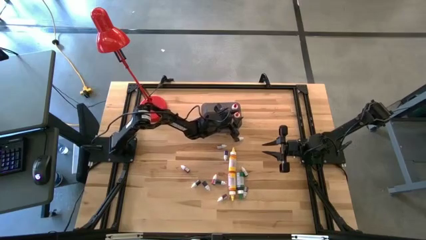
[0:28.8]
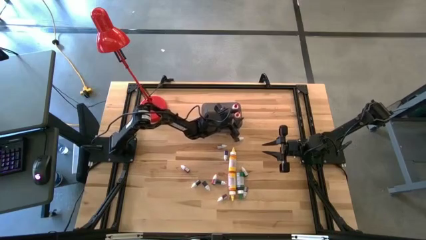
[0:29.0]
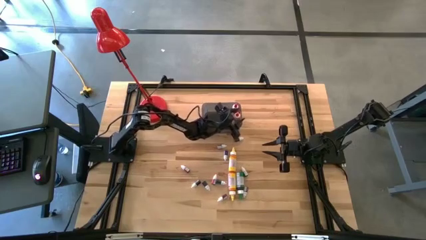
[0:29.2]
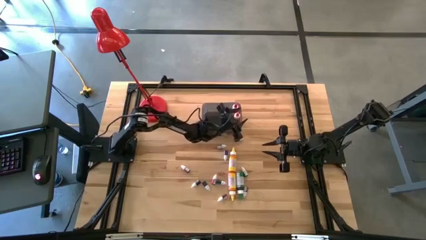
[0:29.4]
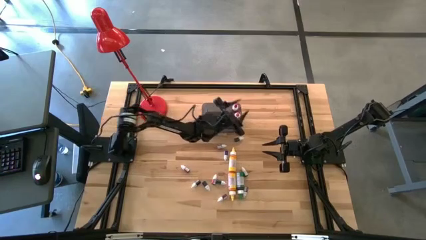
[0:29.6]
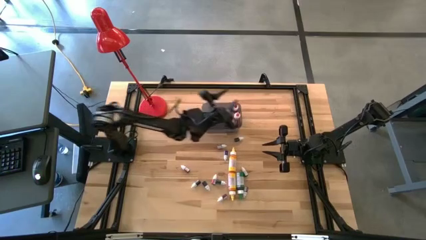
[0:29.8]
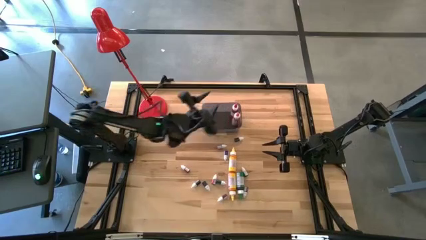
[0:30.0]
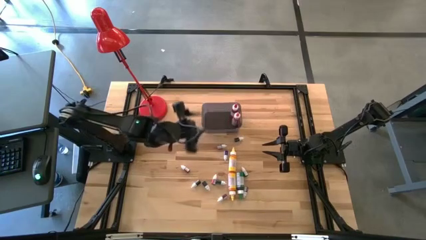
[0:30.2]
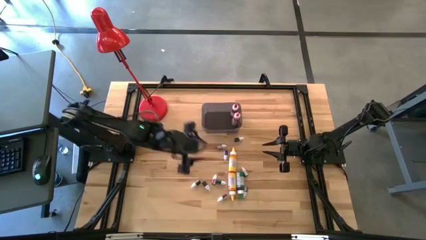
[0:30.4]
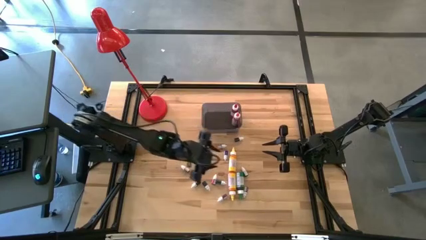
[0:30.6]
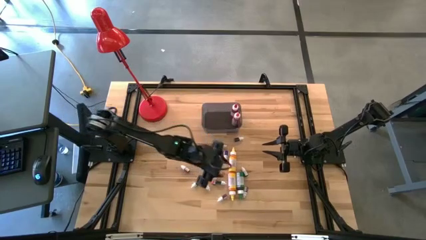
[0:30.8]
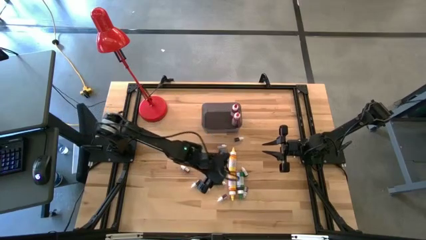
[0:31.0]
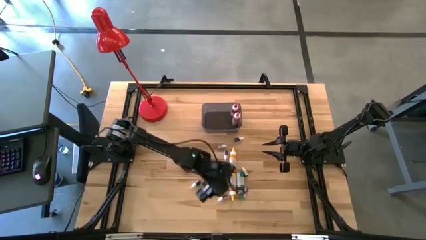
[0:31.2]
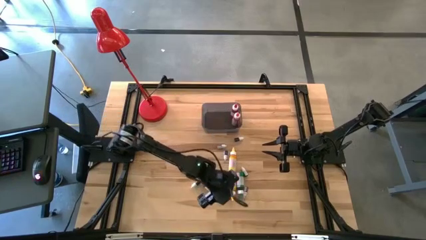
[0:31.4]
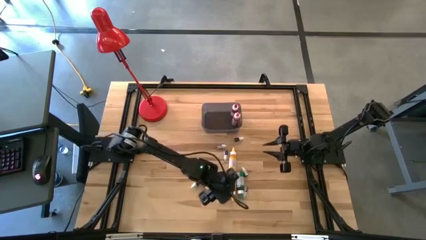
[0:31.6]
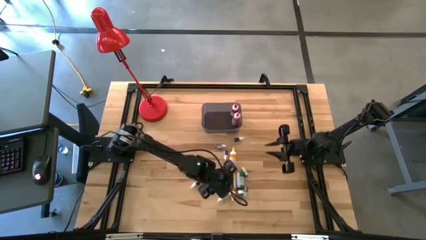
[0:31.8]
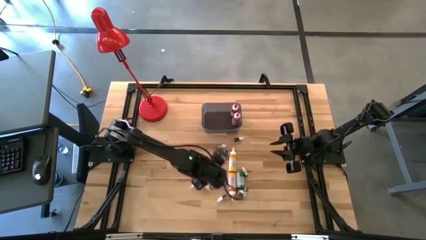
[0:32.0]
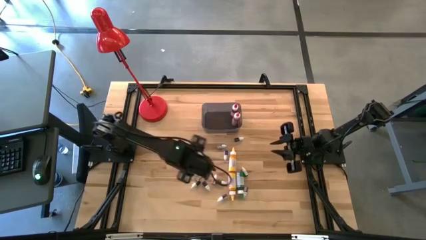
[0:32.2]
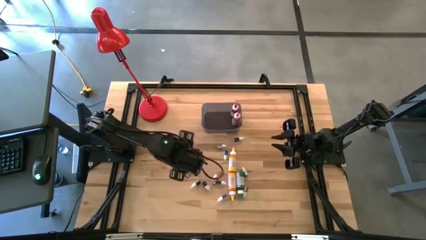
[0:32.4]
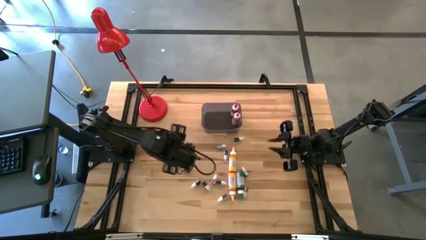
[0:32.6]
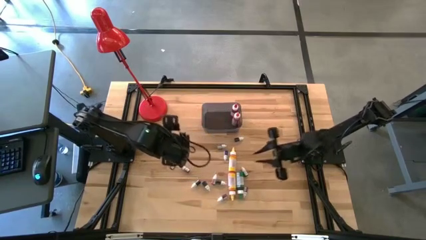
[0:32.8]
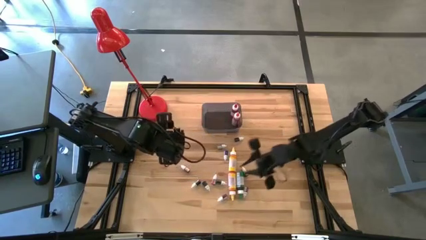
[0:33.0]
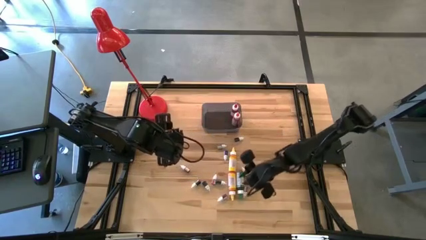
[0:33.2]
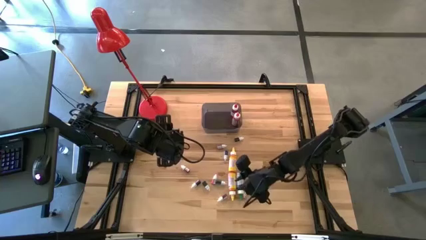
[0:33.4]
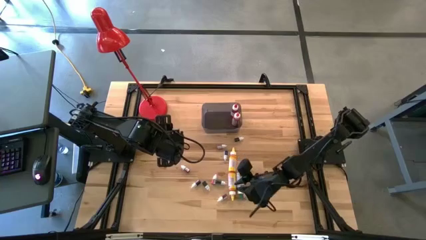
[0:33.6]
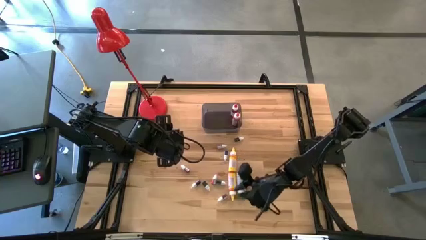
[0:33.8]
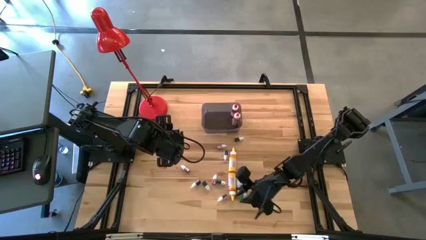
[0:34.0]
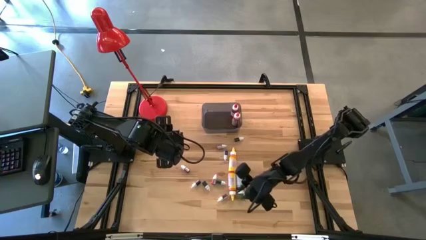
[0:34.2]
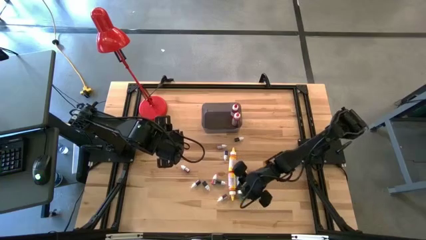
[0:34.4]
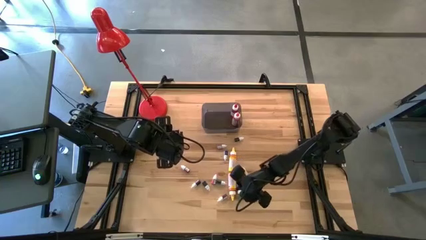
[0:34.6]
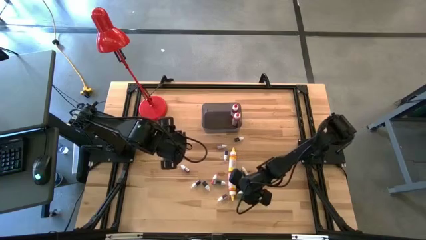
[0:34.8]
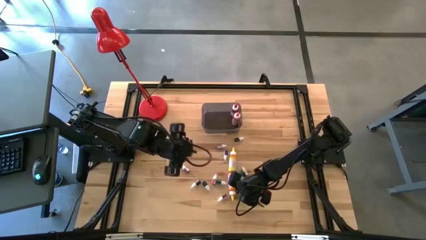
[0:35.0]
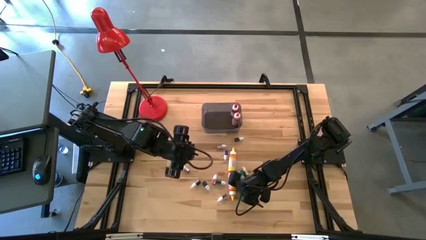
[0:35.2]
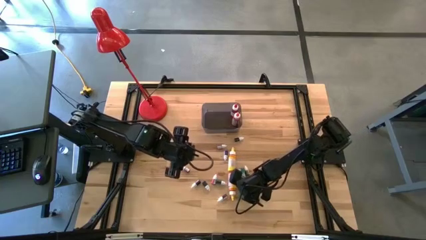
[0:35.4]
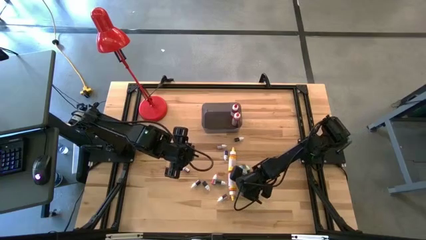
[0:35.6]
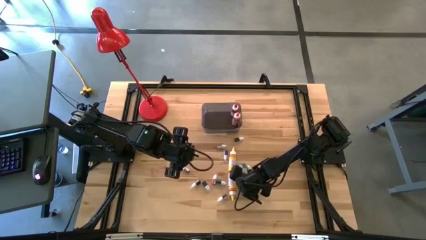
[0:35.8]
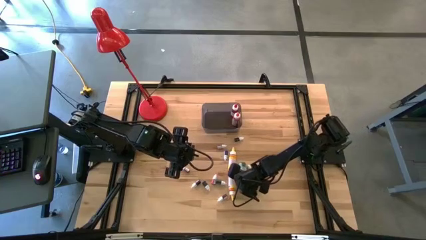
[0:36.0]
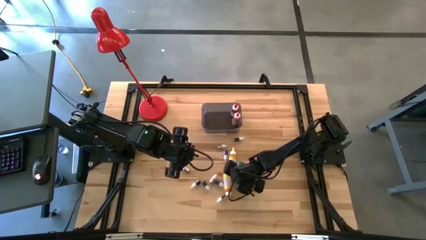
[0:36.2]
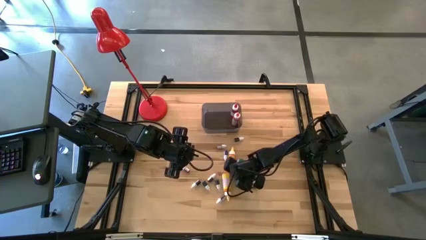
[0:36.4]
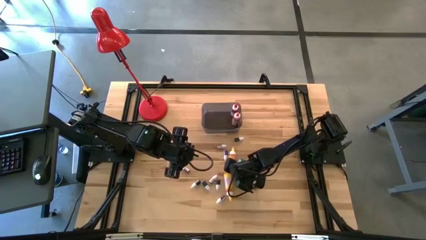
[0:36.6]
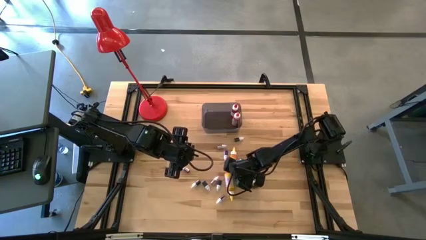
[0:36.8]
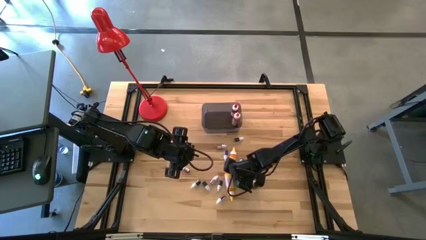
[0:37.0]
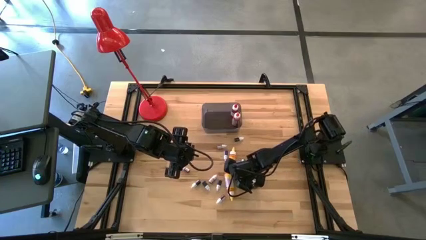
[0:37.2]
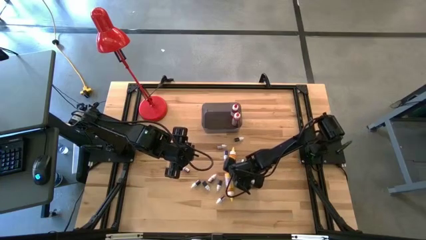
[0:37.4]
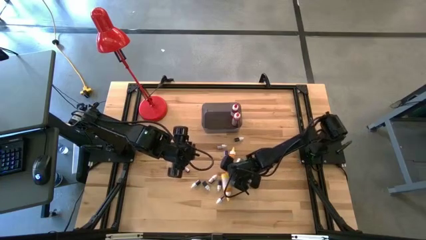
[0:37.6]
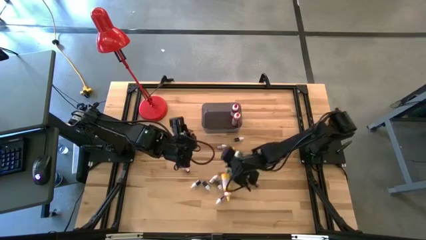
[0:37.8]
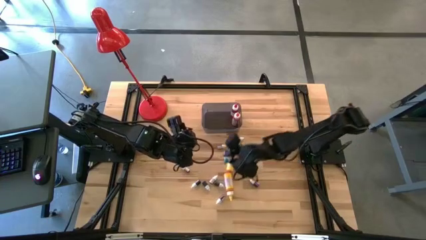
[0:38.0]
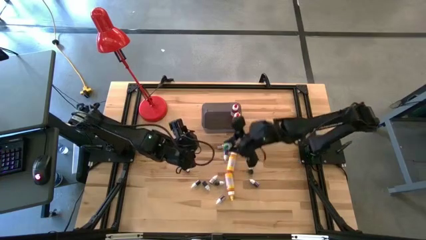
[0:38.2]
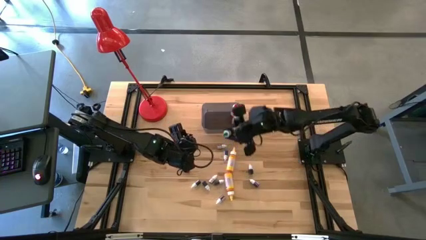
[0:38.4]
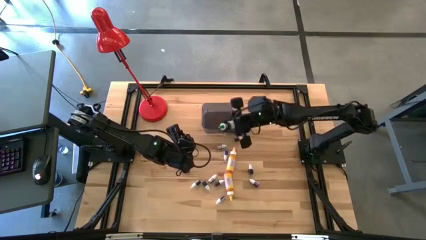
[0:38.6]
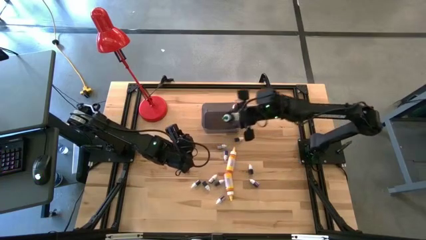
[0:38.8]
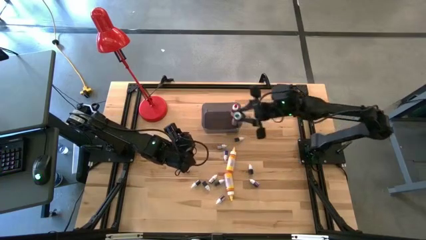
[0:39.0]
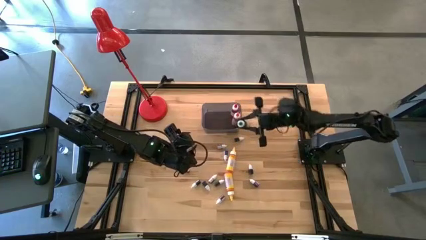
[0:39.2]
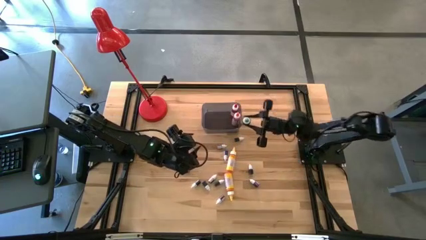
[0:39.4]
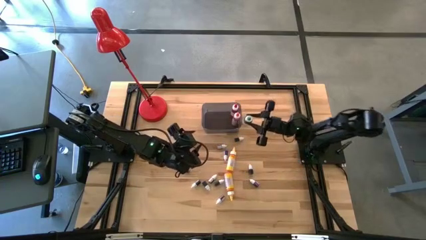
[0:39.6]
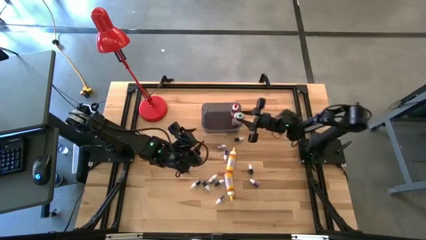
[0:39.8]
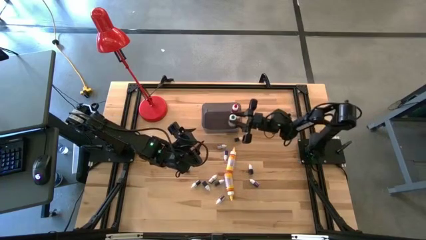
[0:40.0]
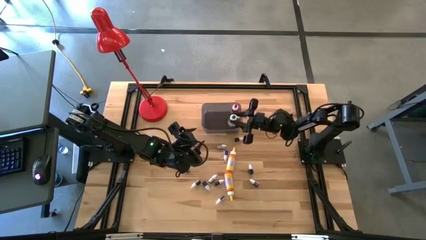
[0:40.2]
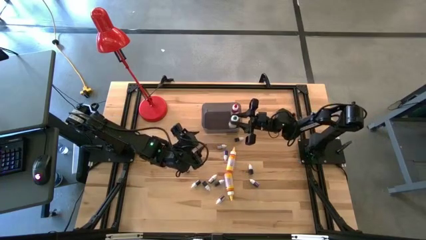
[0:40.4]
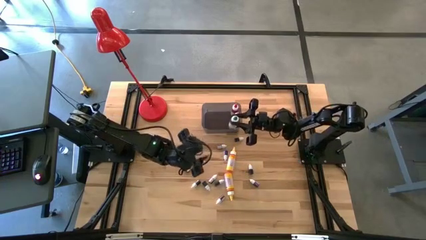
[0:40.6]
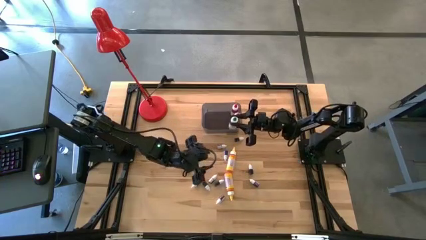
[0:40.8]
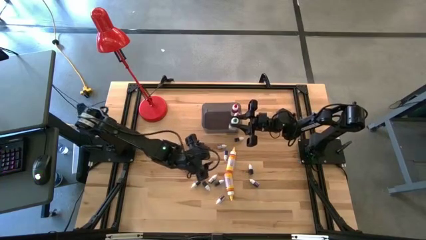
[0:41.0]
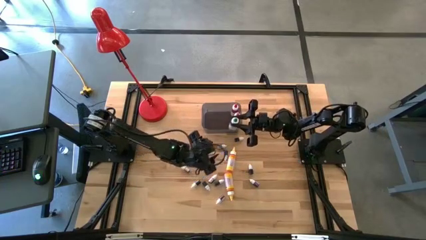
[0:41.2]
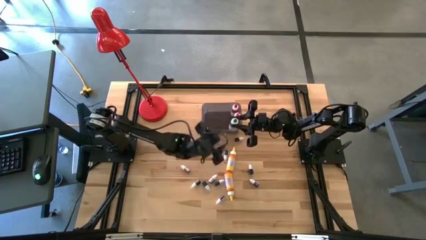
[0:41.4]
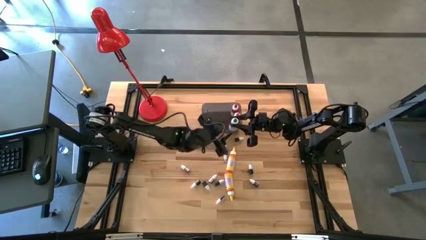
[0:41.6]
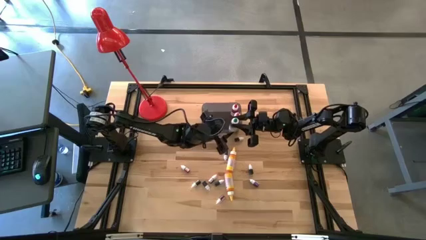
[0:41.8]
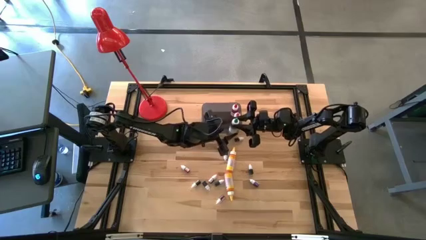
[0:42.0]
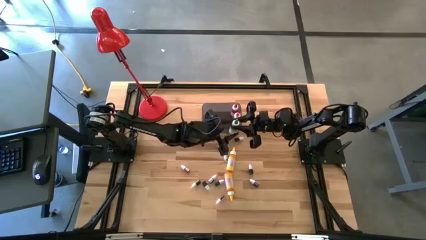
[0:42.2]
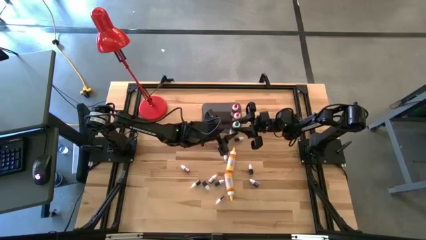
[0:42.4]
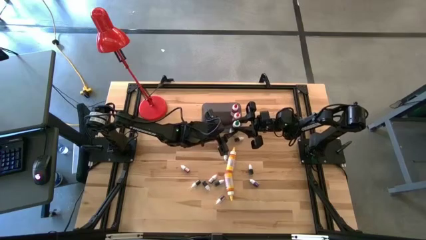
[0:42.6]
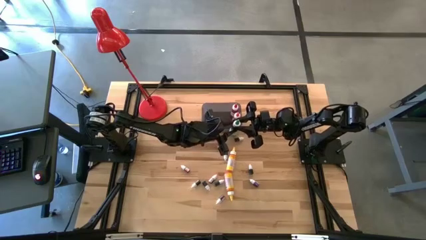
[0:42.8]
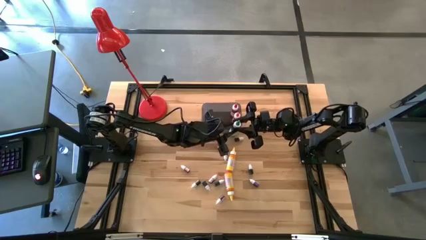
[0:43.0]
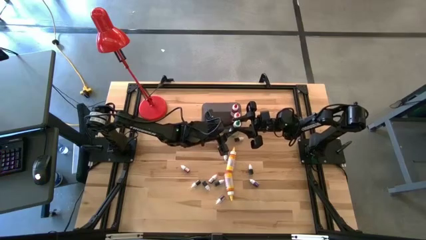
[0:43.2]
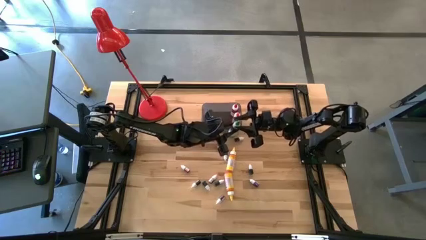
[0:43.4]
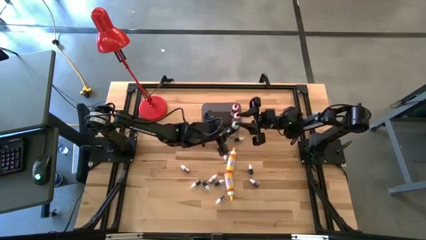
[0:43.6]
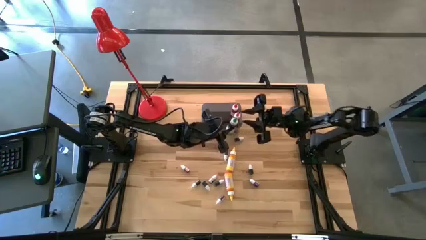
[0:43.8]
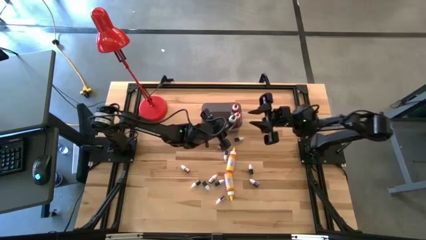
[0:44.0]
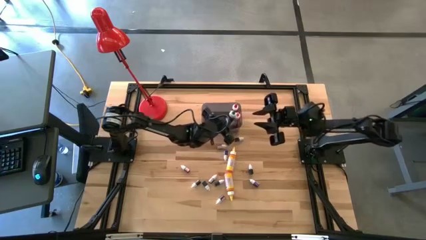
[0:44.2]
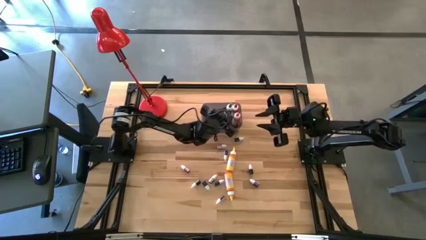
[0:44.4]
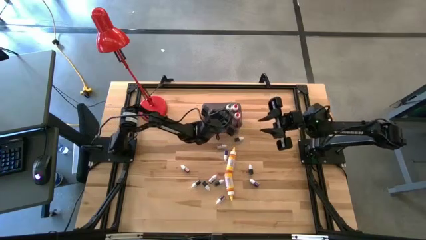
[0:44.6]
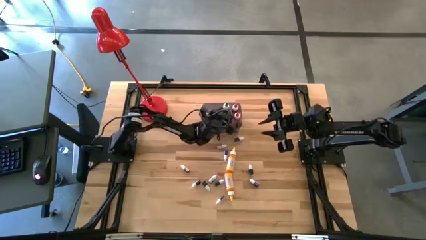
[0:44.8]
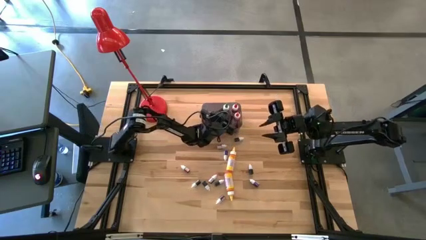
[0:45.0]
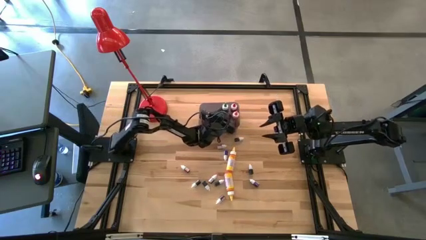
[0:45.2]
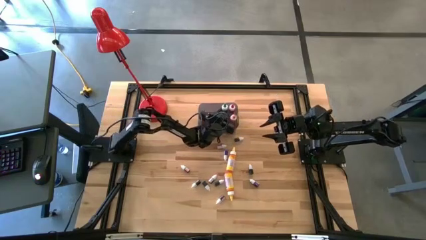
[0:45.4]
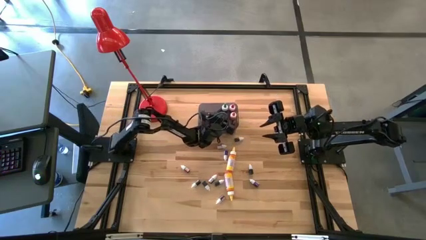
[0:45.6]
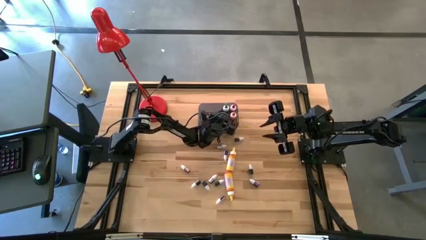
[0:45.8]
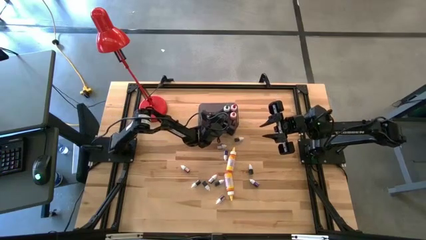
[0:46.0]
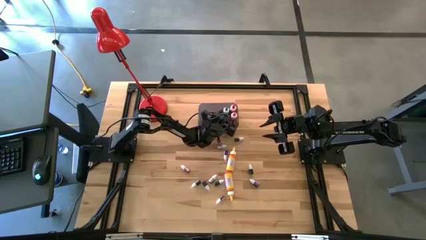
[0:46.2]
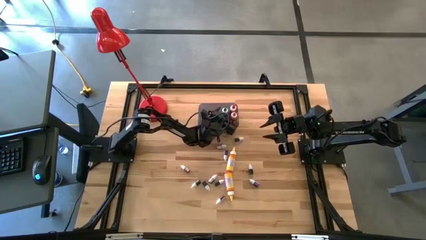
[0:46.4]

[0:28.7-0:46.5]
Task: Pick & Place food coloring
Put the large green food coloring bottle into the black bin
